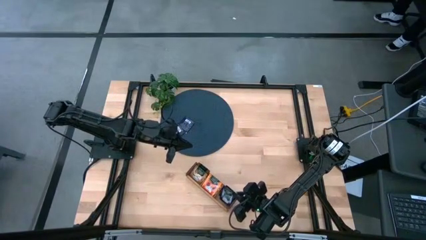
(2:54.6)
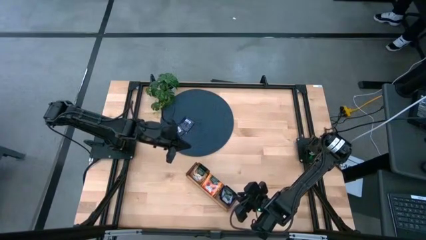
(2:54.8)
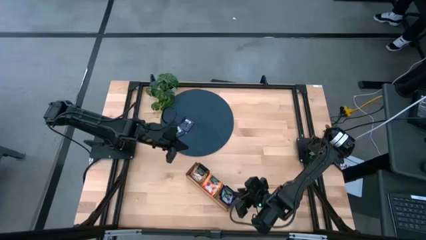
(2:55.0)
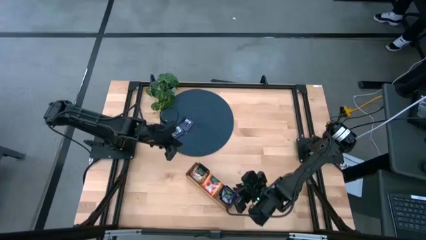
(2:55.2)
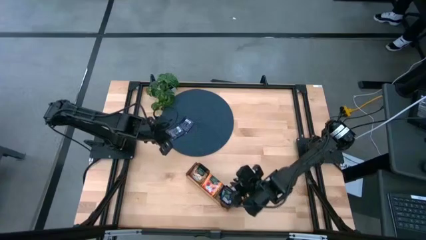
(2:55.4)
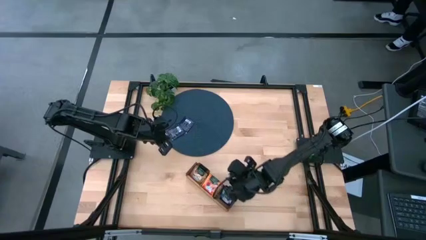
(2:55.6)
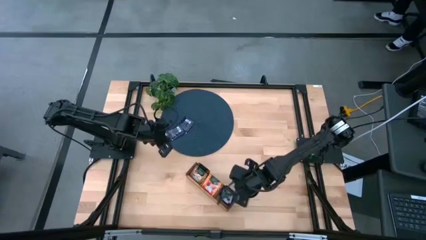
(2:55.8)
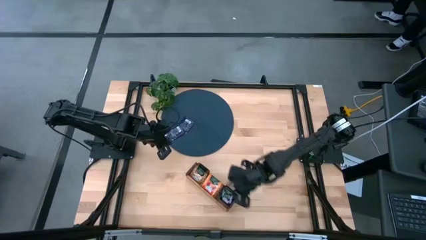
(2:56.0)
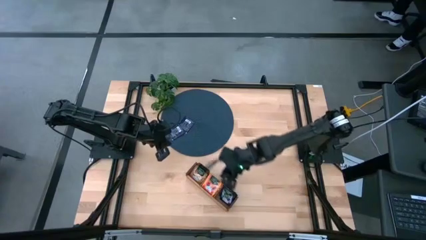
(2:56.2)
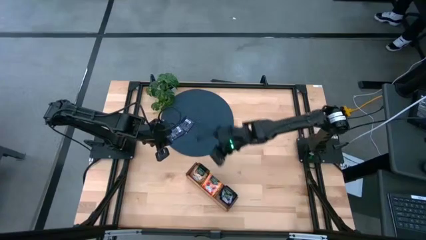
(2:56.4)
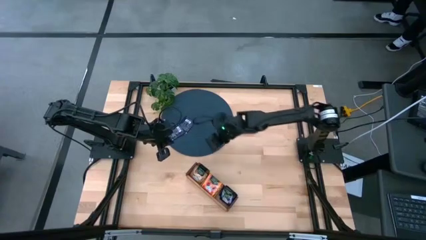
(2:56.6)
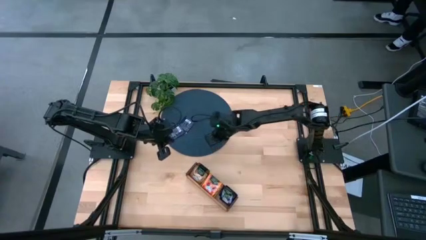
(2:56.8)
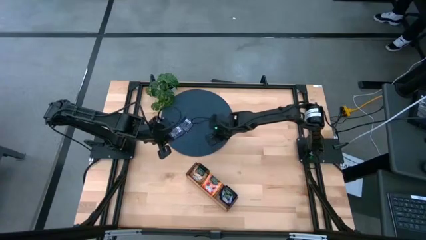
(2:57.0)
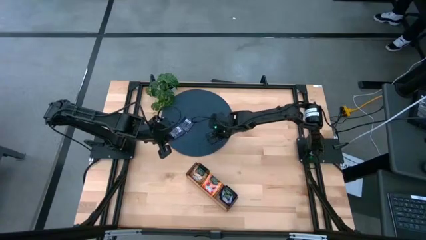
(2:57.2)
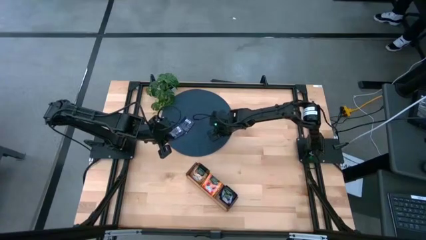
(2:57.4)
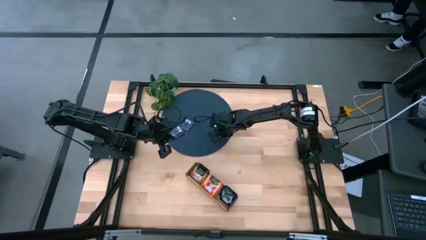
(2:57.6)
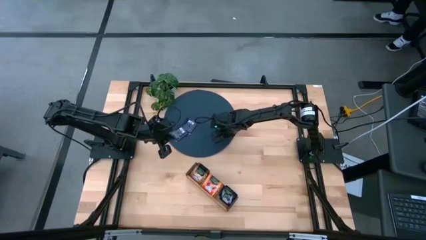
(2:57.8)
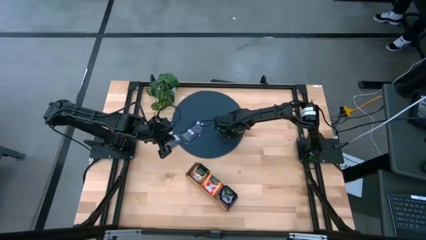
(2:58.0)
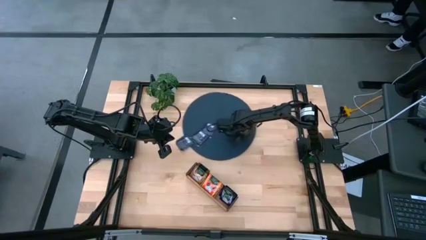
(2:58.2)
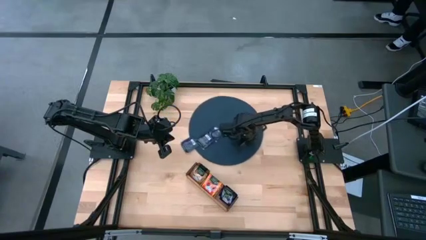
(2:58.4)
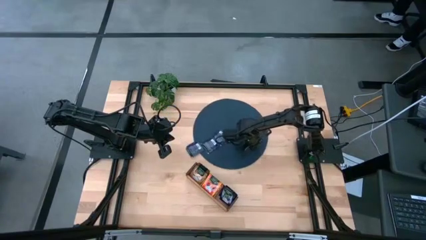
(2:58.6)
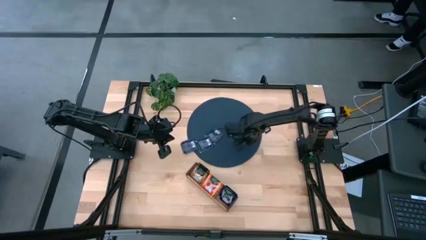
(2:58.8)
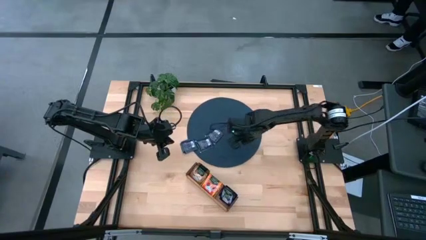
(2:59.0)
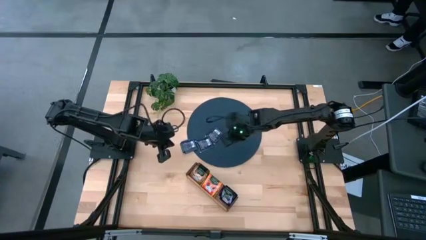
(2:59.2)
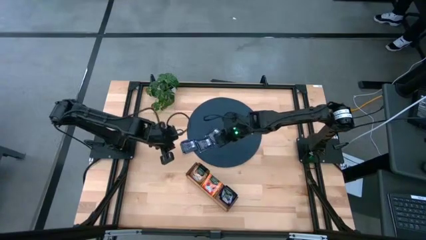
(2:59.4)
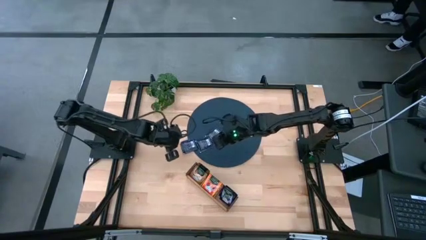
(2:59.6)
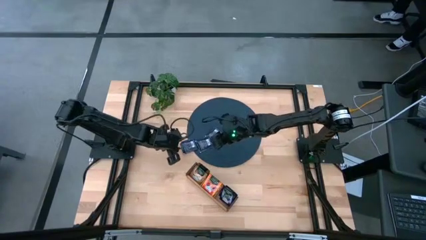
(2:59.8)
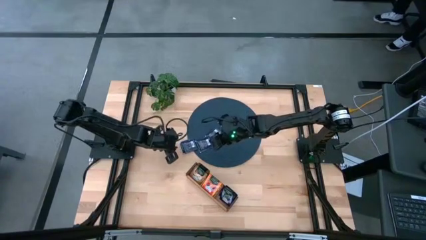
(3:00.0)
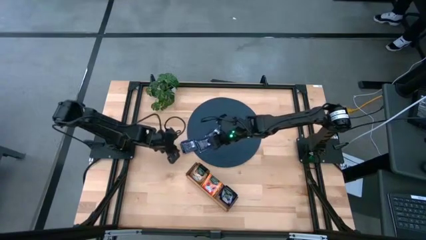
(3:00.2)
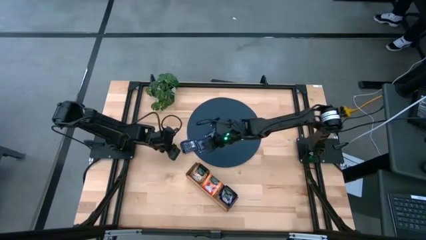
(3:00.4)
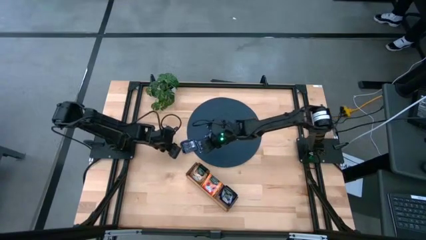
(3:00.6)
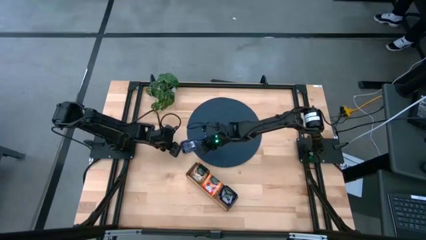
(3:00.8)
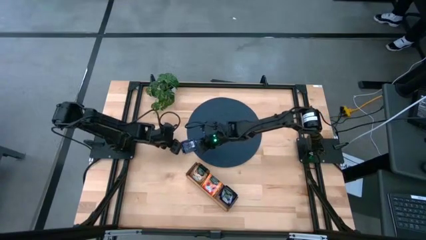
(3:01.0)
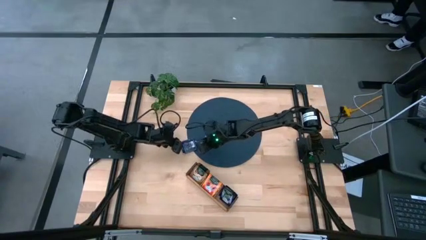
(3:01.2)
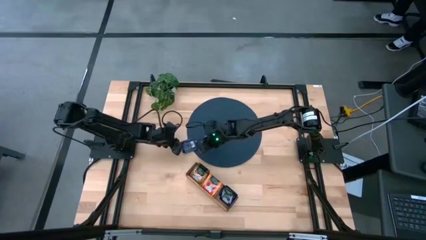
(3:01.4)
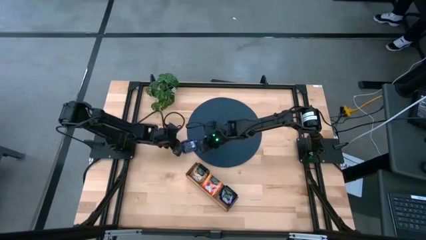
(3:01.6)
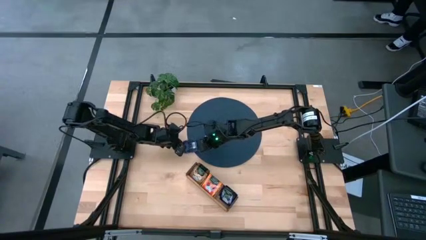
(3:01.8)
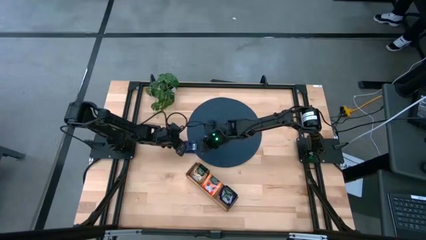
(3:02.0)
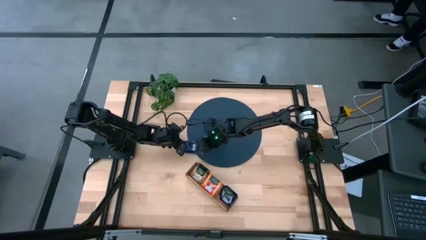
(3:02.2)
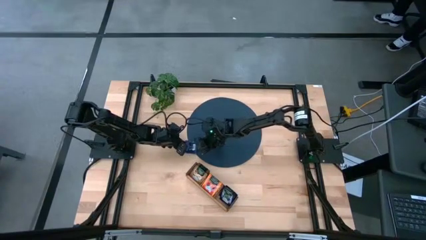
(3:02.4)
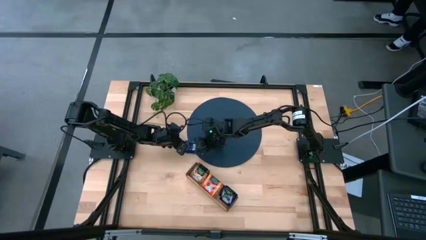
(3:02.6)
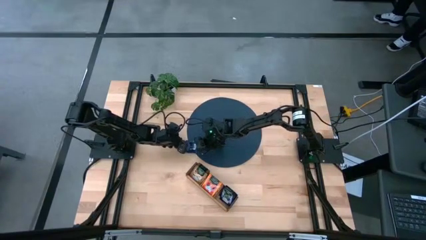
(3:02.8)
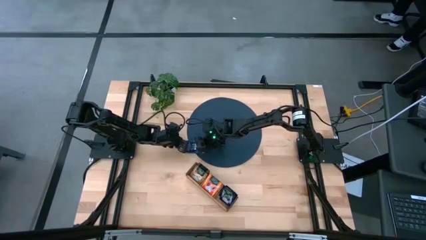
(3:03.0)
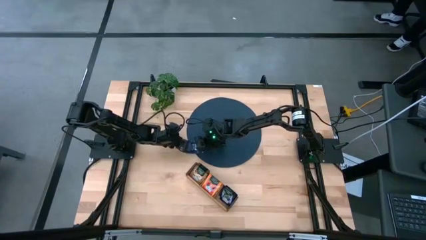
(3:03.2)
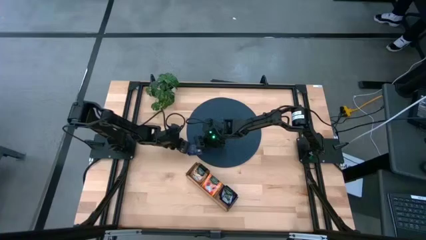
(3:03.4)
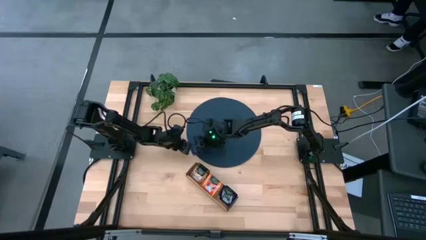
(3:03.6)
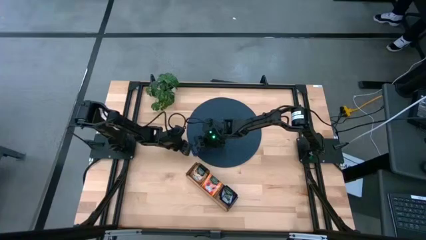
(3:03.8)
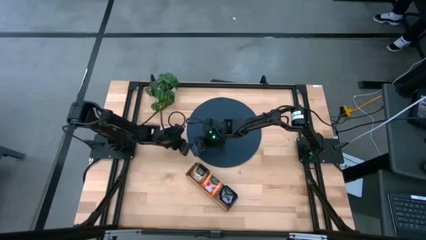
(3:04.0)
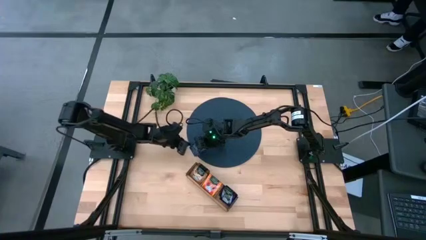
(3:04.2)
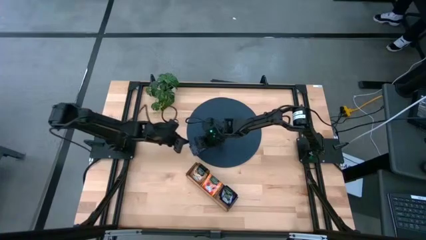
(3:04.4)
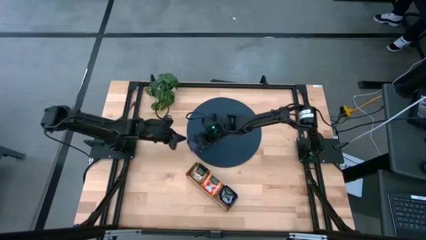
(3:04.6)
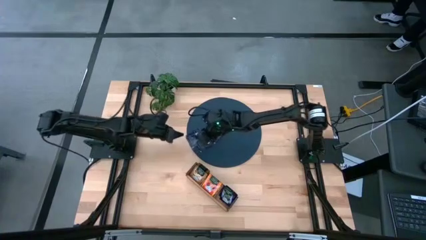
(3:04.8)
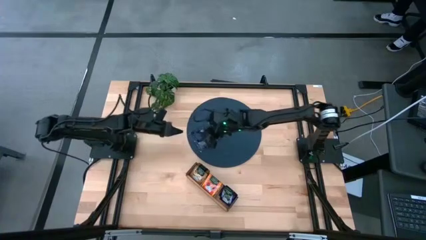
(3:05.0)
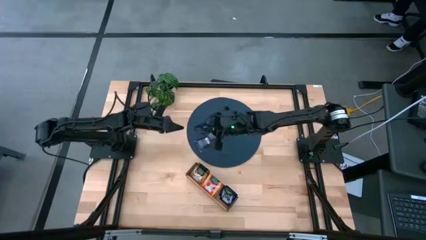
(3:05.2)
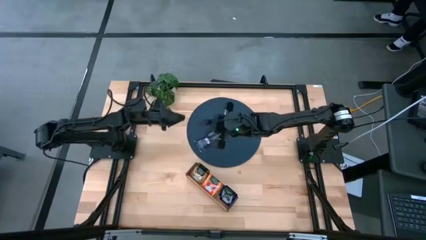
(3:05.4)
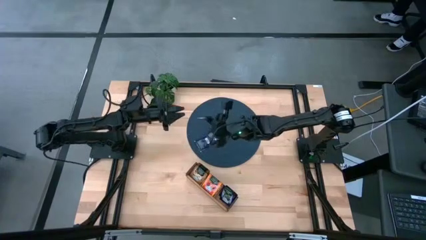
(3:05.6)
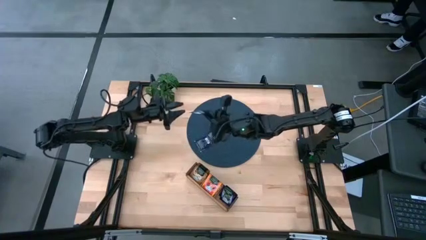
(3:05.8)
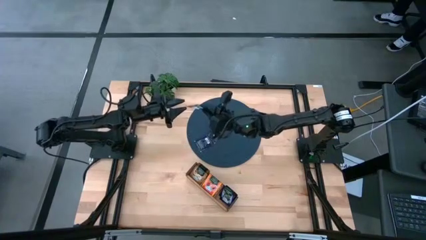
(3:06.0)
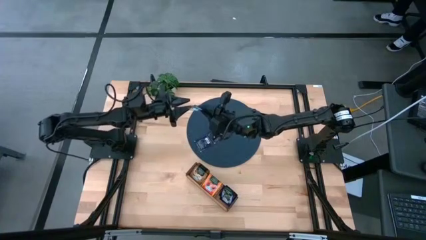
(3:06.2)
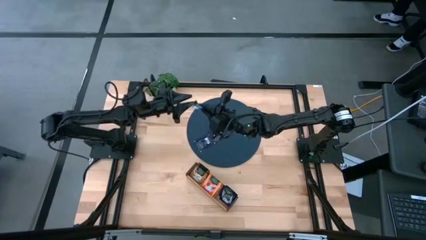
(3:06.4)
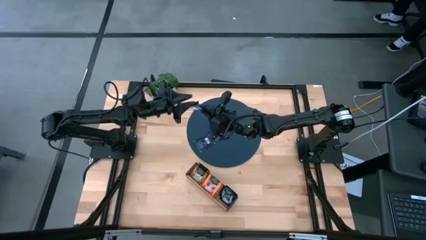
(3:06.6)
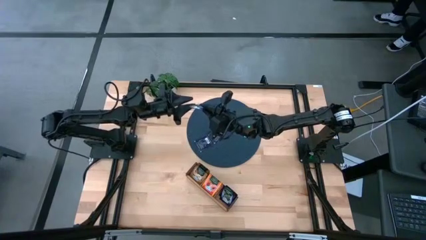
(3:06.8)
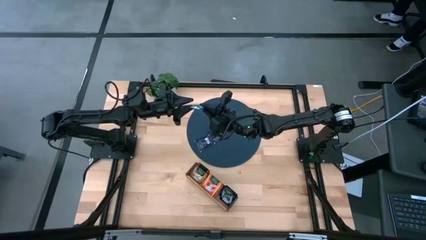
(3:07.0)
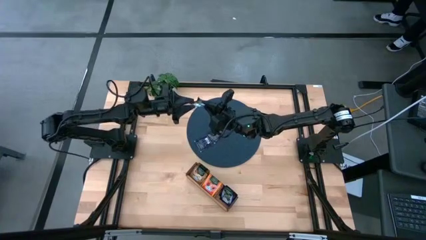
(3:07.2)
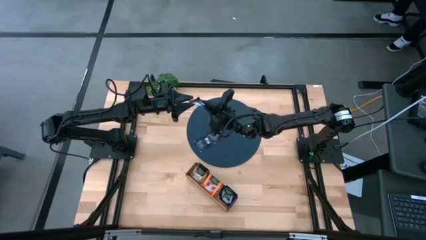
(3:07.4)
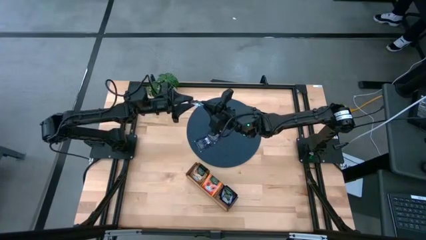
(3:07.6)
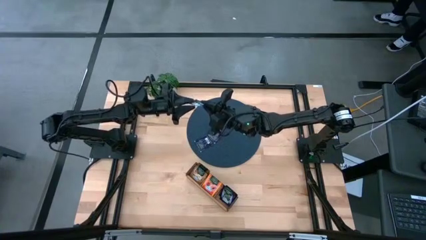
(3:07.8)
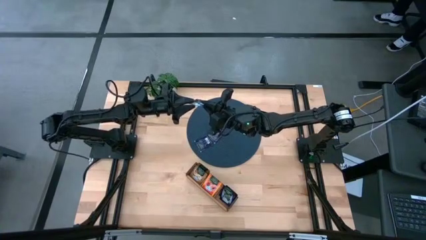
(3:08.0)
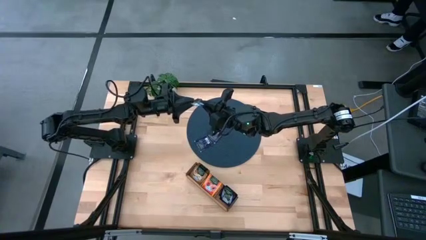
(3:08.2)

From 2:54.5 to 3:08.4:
Task: Pick & Place Tea
Put the violet tea bag into the right section of the wooden organizer

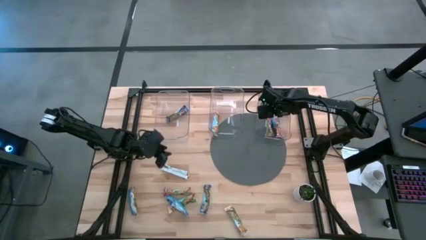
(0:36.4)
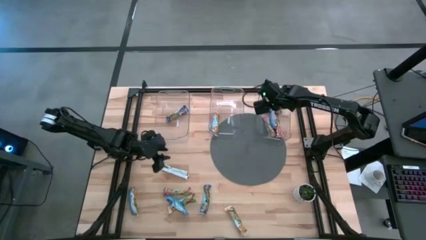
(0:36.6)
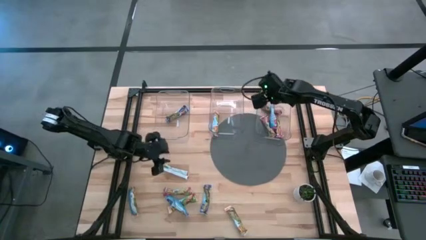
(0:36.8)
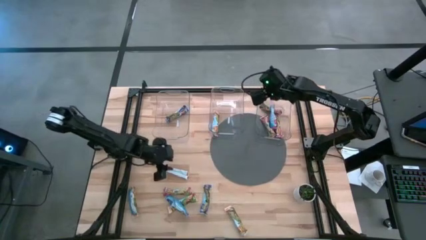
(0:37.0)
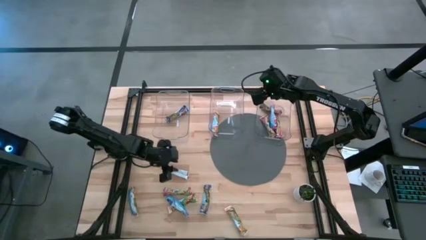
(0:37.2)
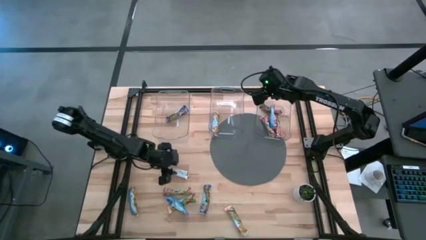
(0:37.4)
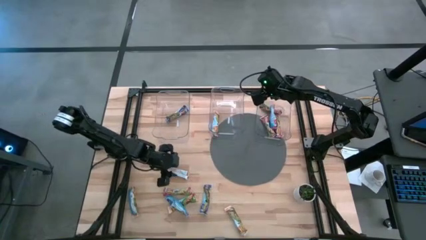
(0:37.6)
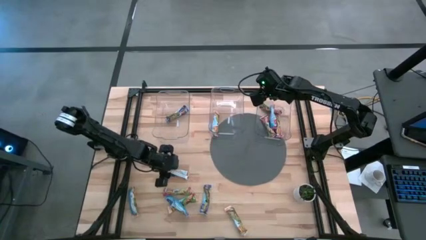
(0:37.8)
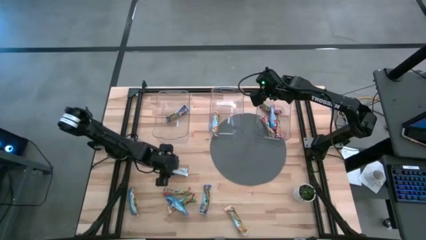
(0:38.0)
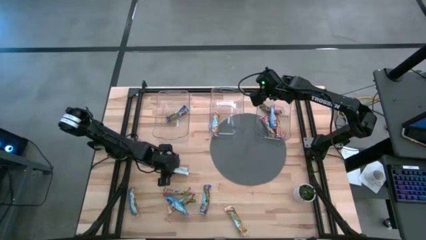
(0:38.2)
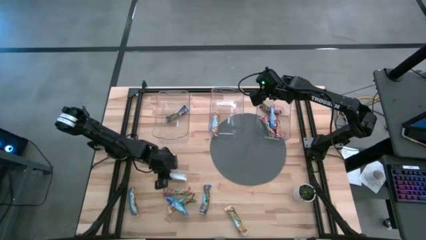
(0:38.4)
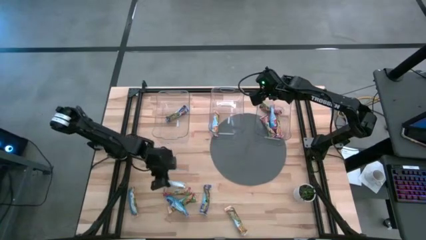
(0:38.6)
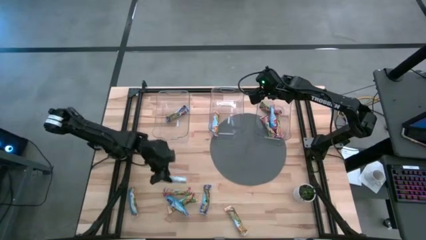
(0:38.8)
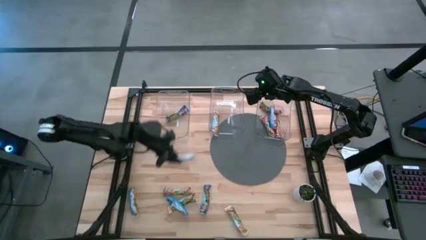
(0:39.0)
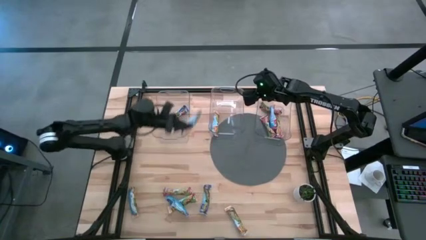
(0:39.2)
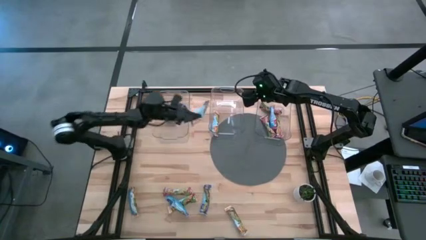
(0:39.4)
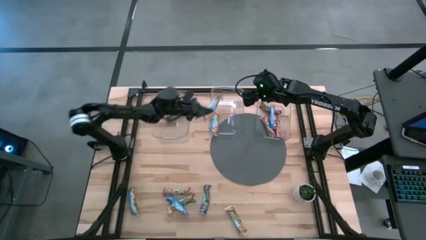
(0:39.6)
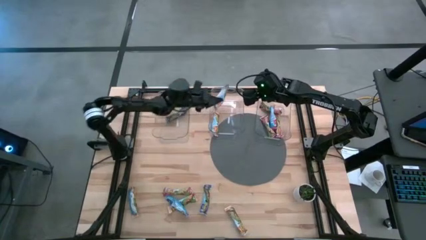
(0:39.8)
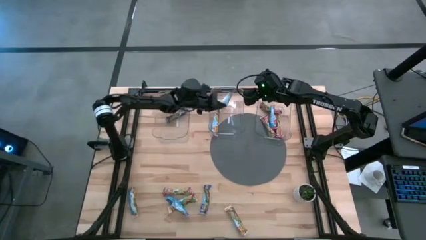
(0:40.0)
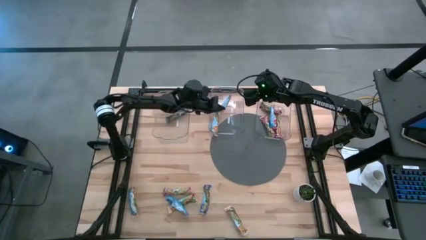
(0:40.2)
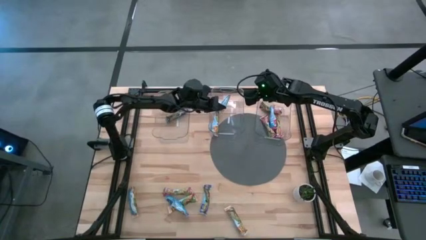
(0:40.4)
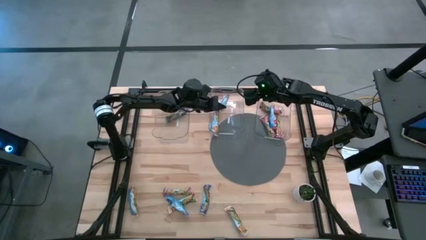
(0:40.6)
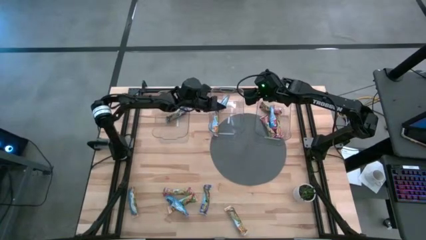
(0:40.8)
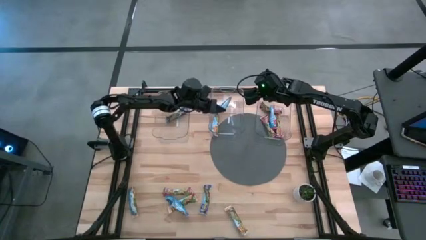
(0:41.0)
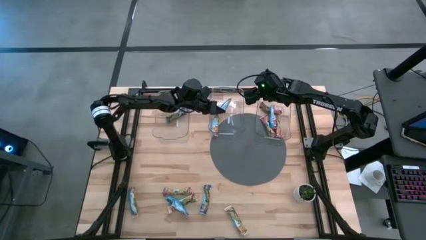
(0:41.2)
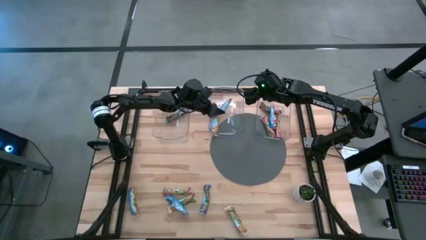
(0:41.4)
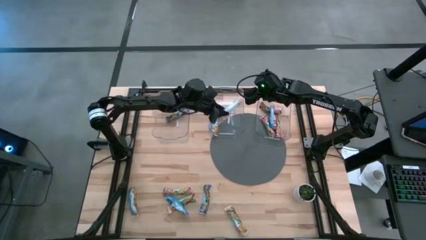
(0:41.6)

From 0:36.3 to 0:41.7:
Task: Pick and place Granola Bars by type
Put the yellow granola bar into the middle transparent bin
